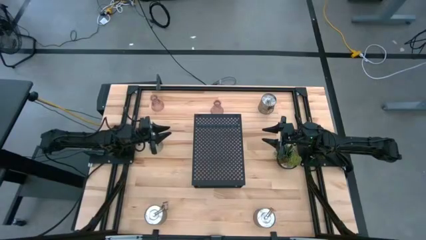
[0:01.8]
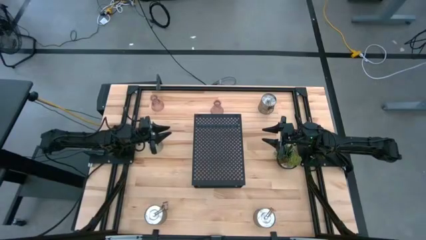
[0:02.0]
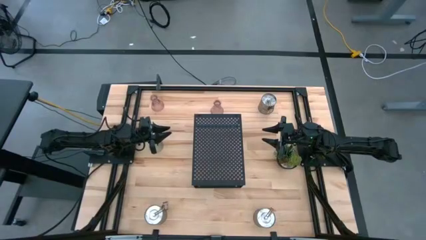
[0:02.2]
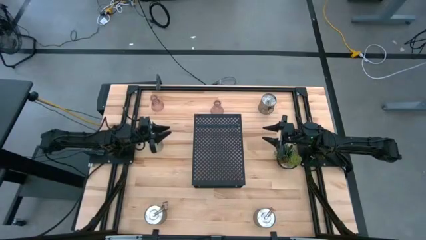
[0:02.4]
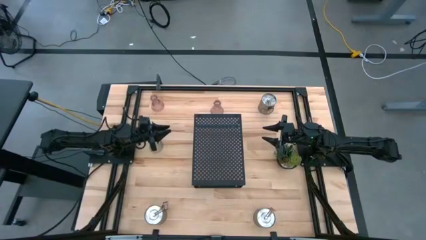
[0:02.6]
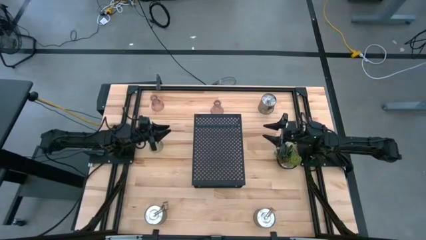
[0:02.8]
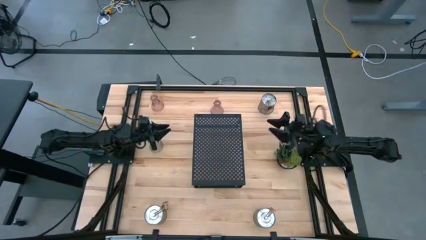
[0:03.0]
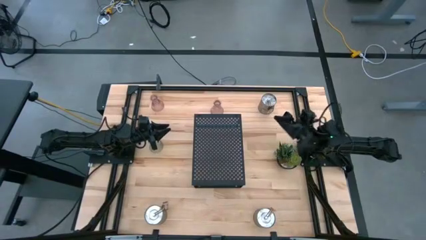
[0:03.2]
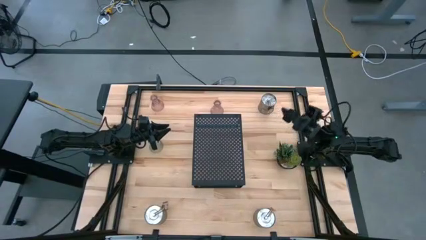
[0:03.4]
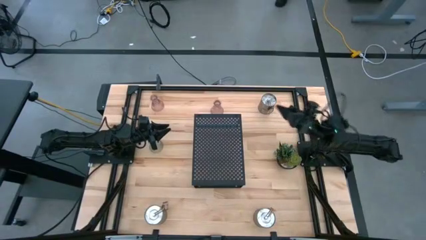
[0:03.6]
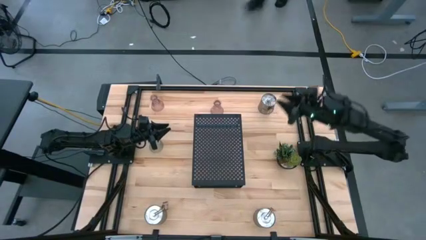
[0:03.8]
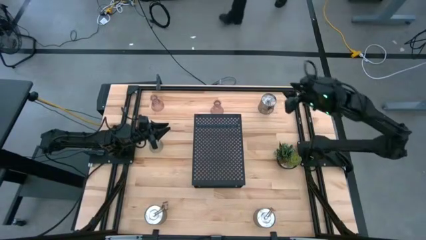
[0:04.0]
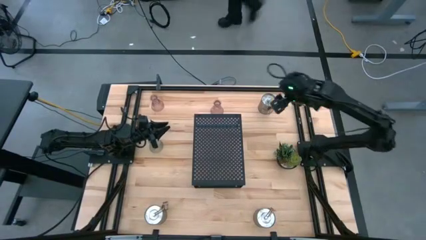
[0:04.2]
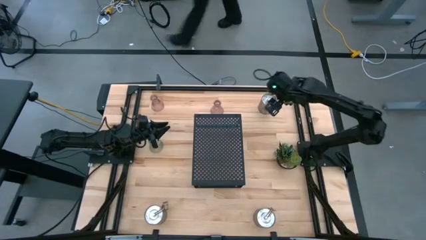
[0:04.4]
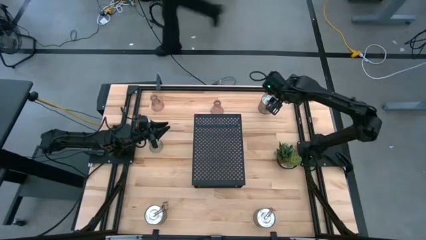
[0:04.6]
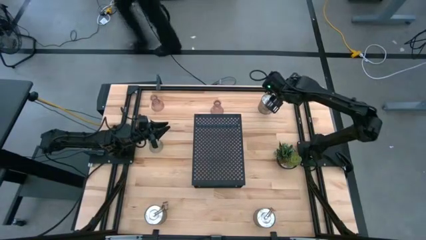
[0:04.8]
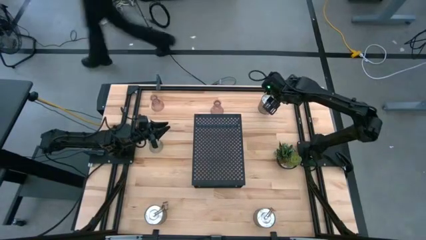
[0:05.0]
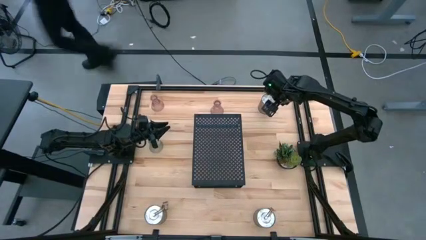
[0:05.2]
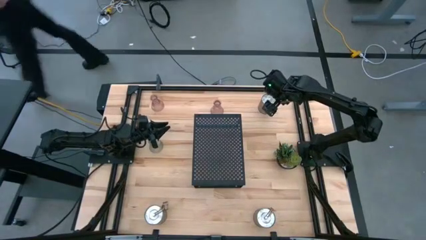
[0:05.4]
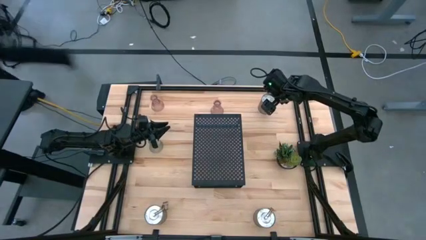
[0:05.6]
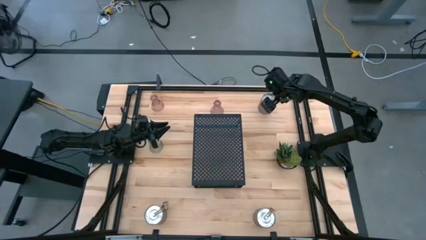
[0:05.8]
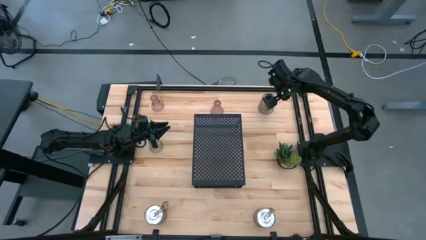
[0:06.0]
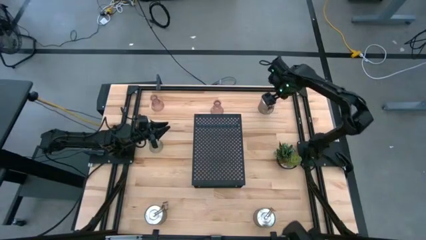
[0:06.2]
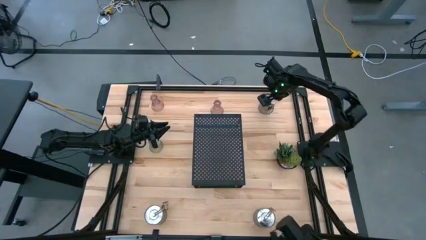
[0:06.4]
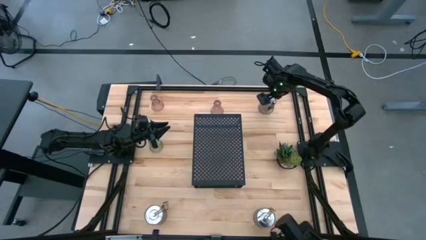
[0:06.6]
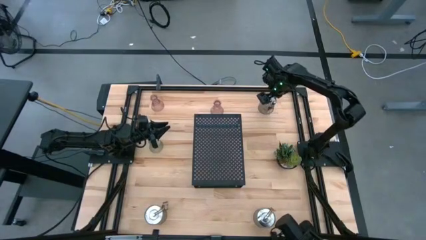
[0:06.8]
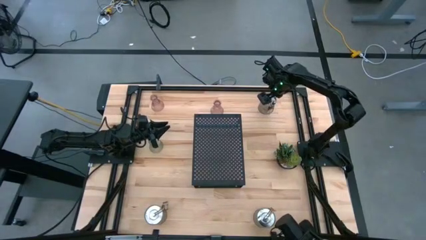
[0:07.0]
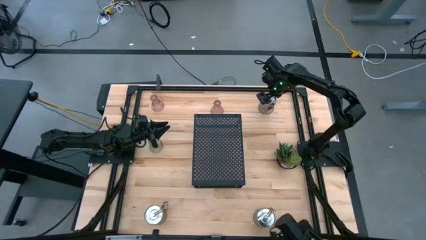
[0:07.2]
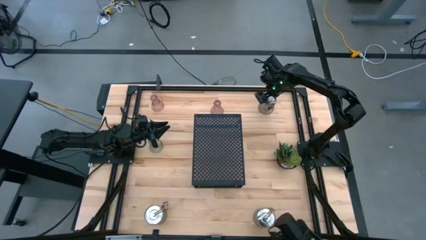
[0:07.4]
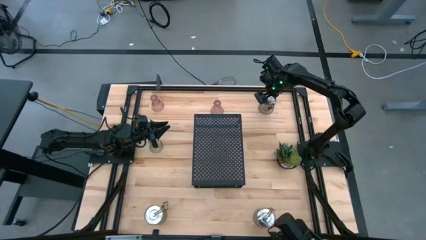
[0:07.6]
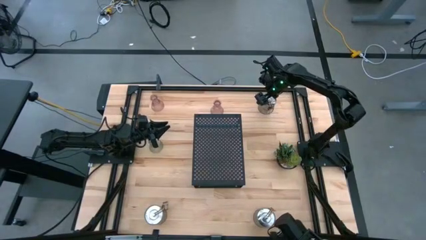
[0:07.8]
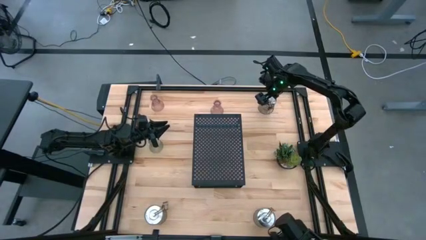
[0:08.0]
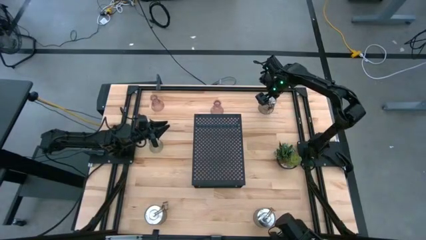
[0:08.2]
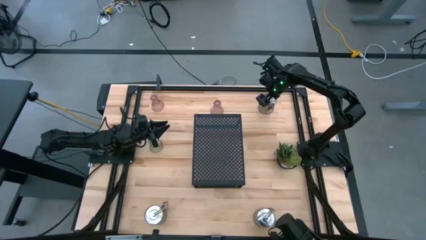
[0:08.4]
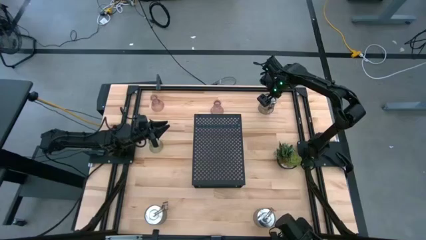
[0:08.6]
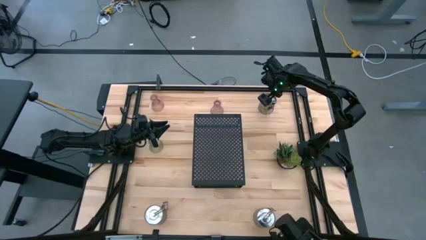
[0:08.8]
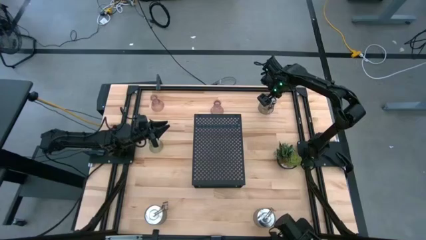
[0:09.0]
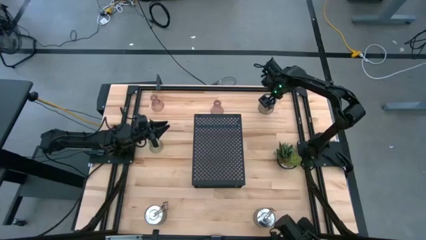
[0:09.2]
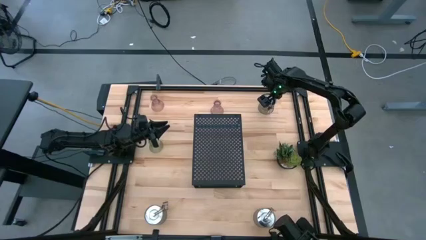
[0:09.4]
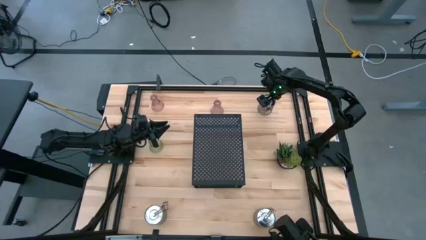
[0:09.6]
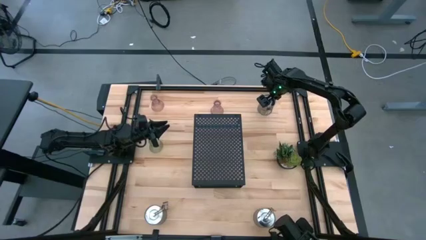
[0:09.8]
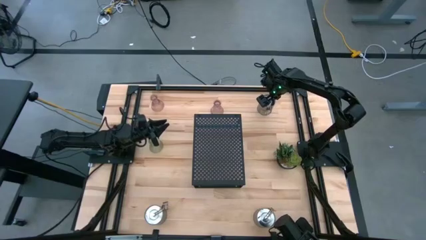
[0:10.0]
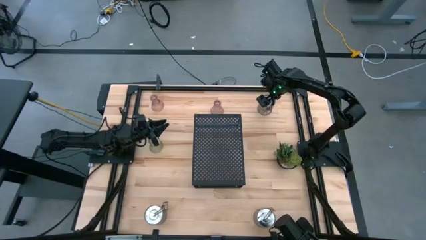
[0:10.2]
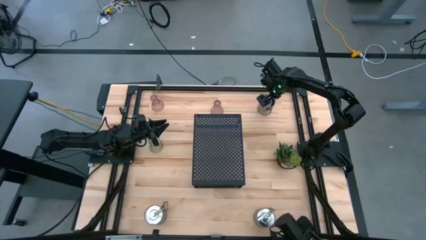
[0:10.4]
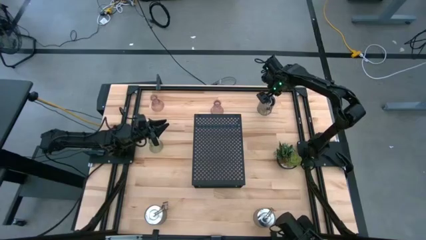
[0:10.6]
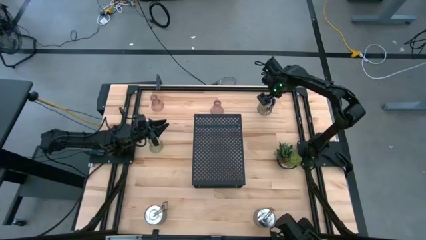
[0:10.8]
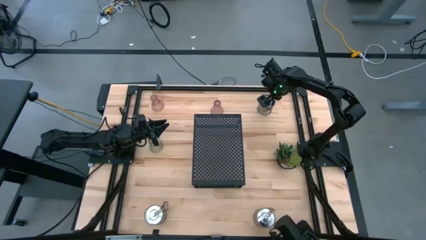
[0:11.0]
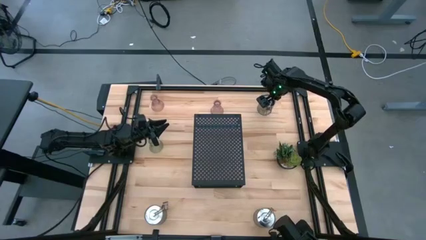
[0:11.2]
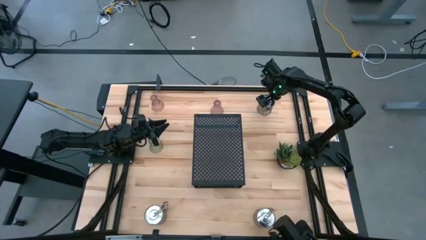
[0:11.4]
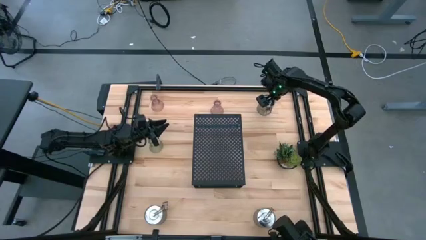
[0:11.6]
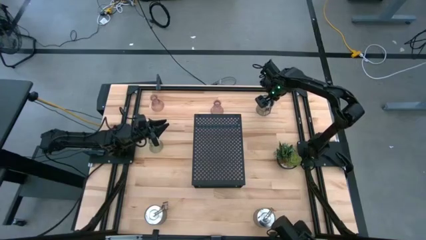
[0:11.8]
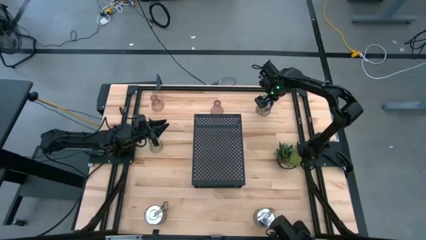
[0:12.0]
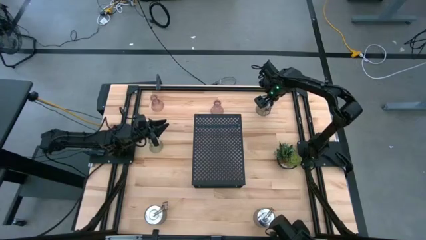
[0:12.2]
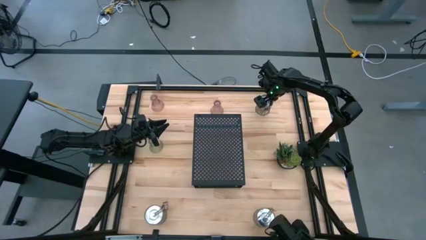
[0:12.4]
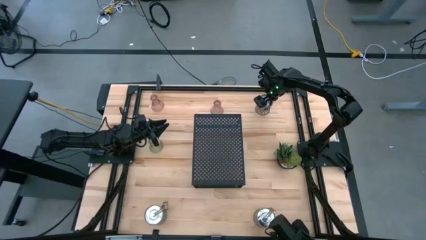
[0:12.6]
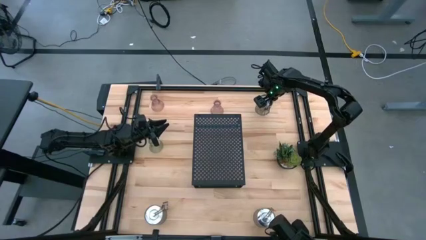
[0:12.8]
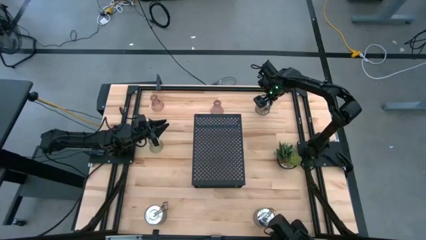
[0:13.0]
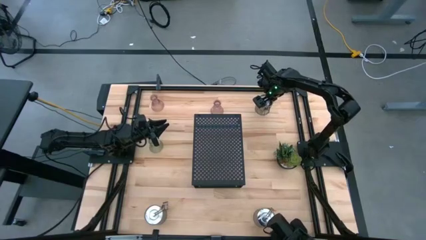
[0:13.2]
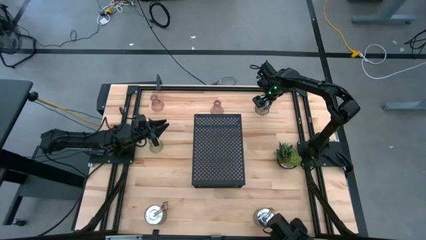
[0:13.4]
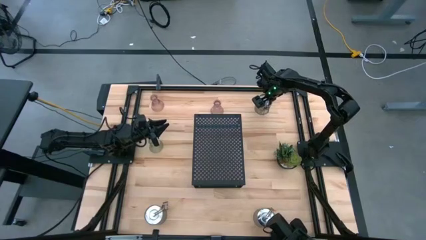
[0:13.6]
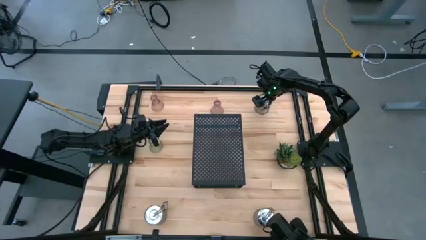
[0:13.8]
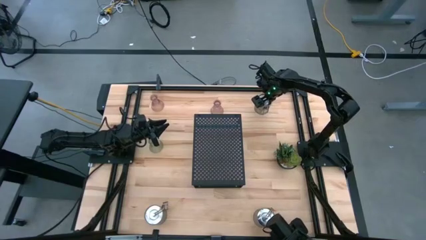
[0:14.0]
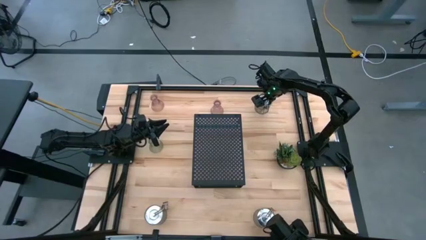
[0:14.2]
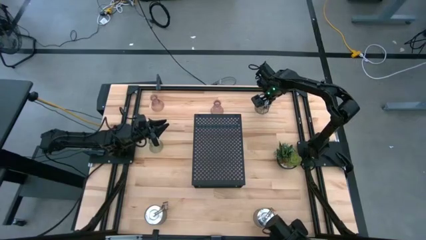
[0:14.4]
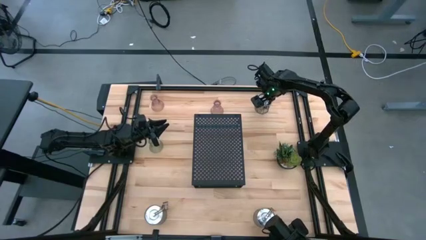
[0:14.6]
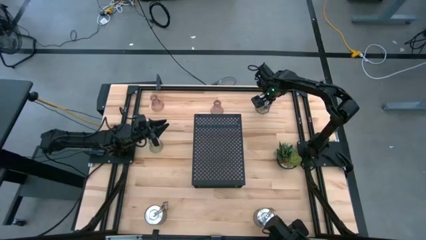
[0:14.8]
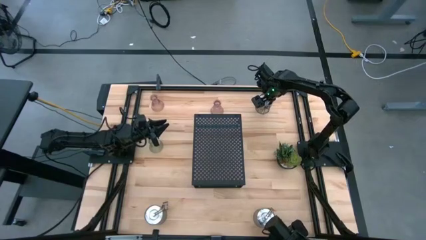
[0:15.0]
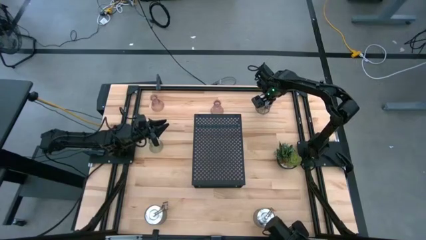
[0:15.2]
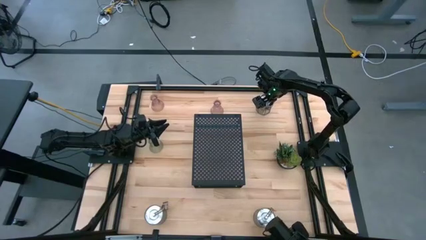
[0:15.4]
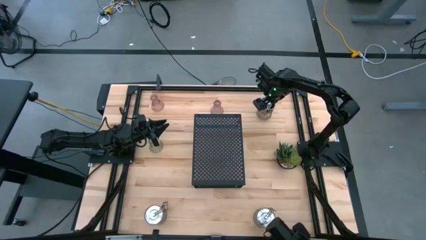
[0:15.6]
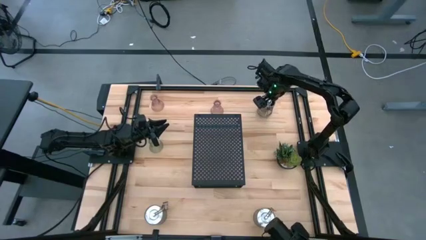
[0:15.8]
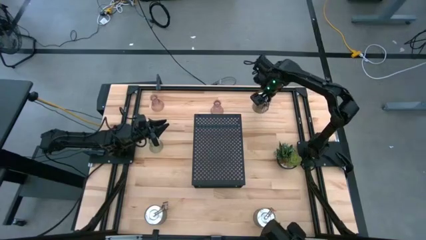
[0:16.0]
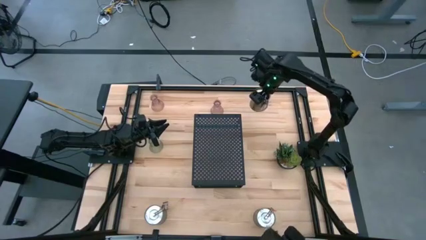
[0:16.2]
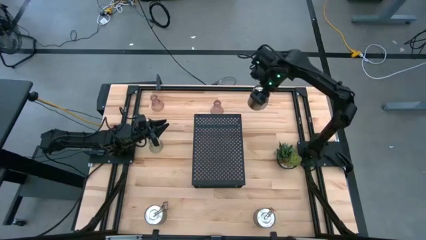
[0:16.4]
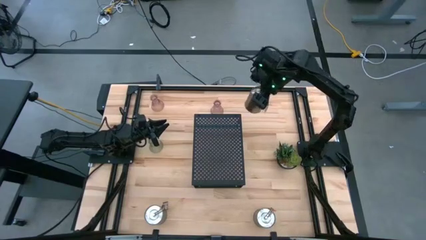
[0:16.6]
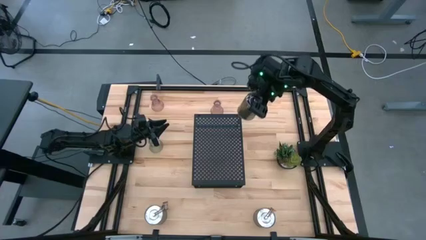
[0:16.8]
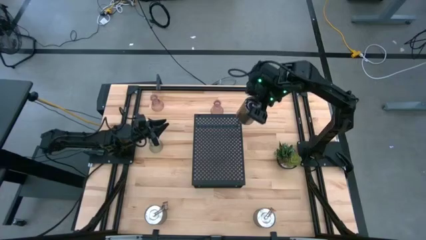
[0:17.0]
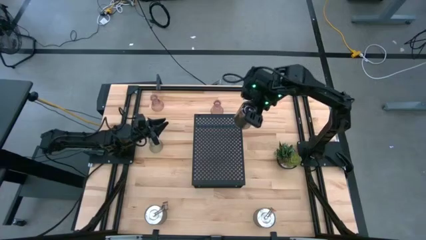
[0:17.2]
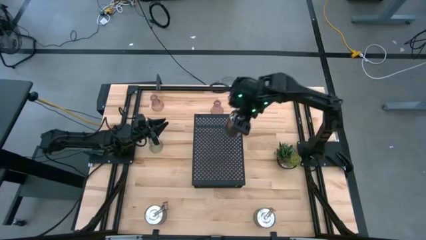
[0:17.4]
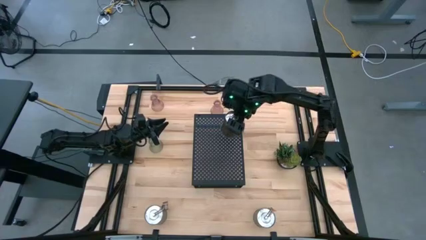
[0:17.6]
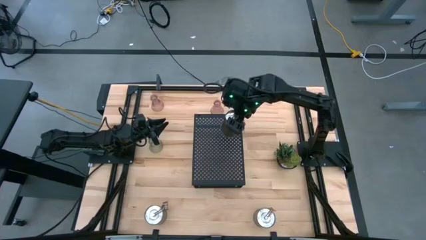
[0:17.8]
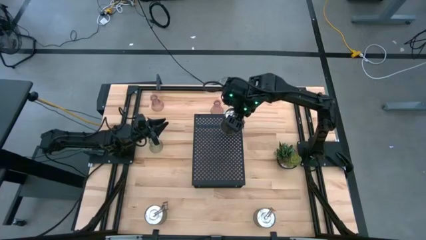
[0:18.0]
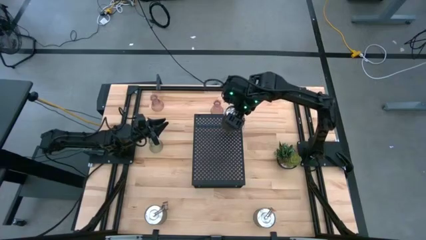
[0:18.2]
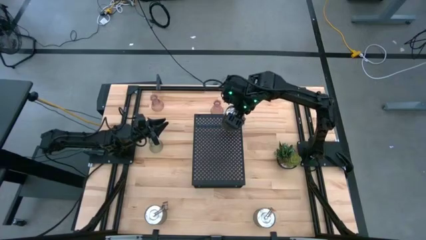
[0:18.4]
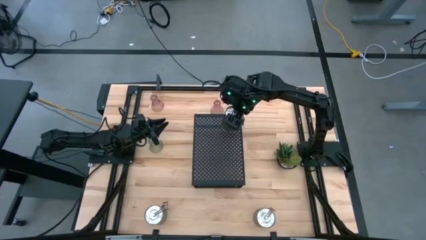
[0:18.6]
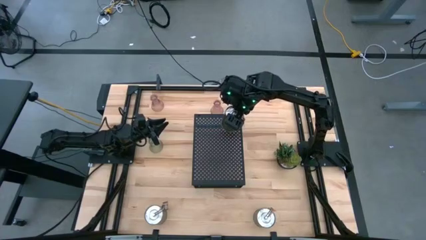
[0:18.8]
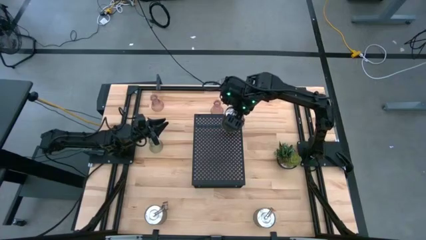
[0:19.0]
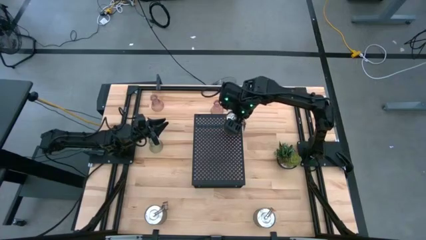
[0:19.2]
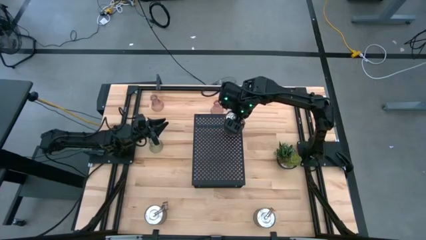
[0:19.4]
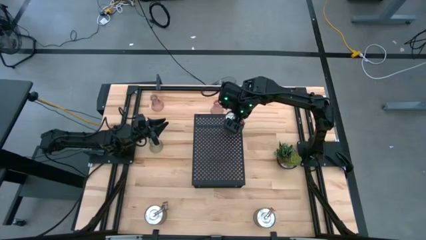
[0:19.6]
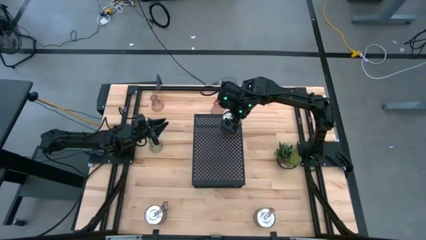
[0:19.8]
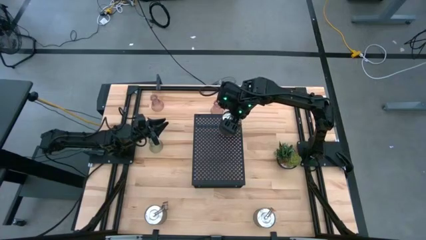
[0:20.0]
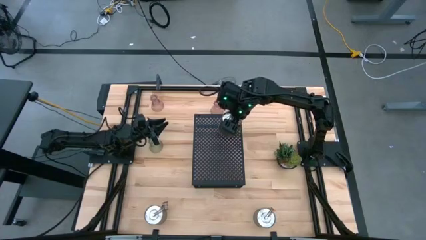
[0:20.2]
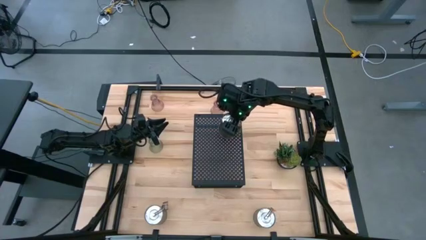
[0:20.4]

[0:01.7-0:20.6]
Task: Pick & Place candle stick holders
Put the top brown scented candle on the shelf
